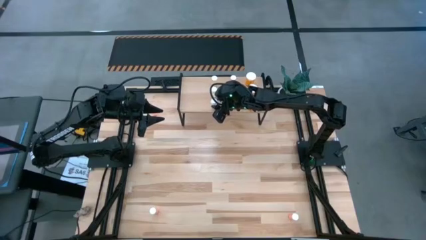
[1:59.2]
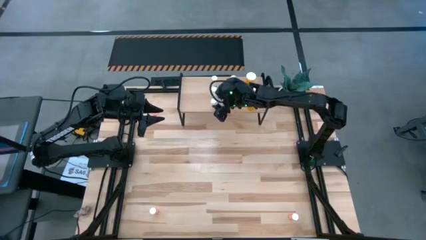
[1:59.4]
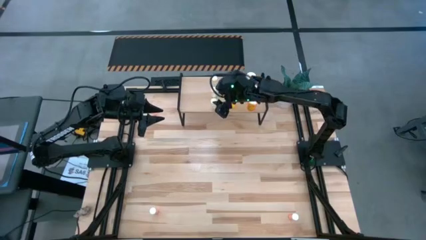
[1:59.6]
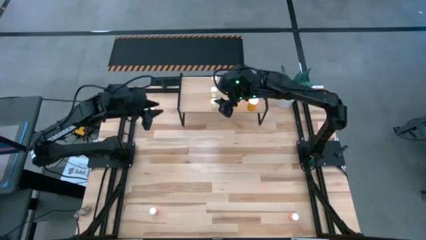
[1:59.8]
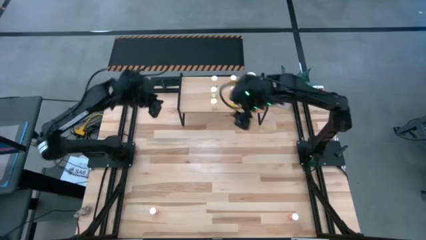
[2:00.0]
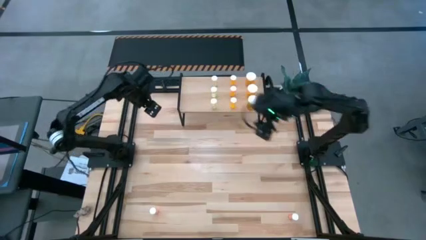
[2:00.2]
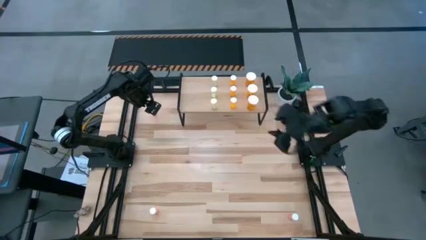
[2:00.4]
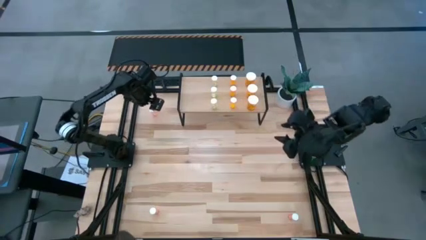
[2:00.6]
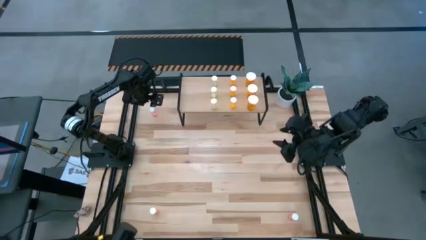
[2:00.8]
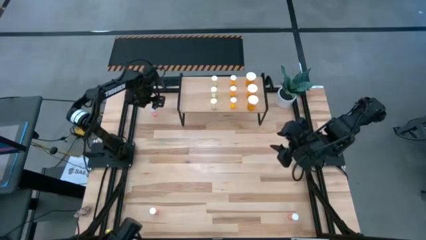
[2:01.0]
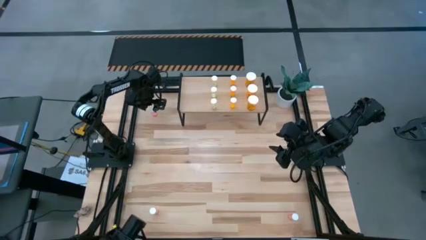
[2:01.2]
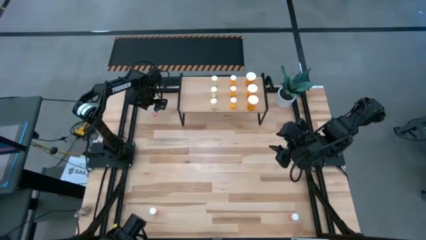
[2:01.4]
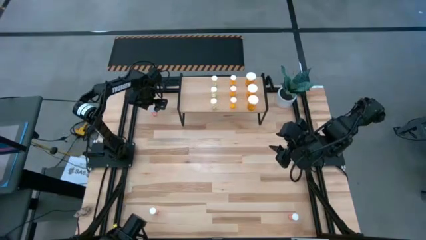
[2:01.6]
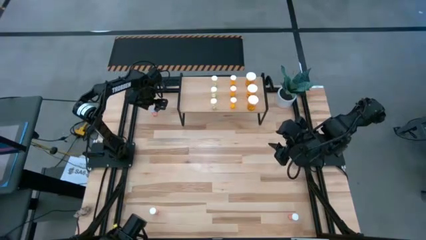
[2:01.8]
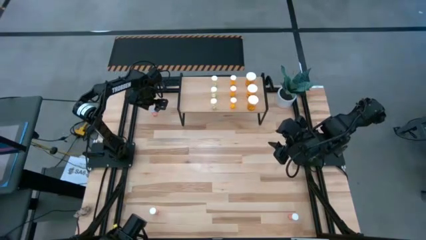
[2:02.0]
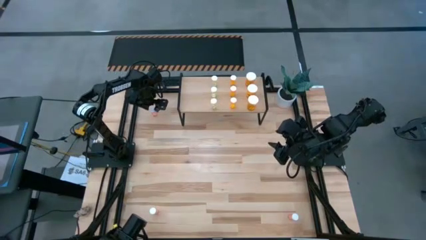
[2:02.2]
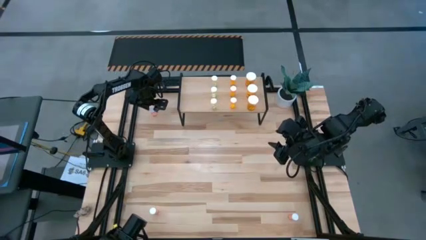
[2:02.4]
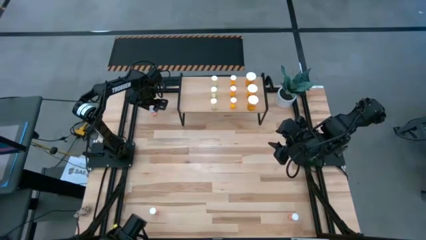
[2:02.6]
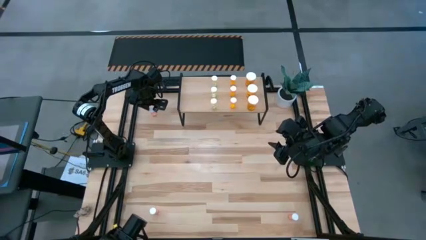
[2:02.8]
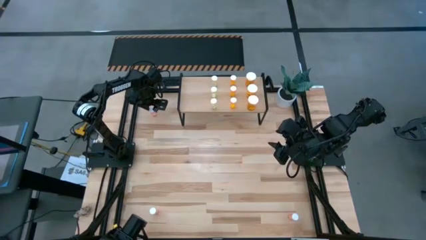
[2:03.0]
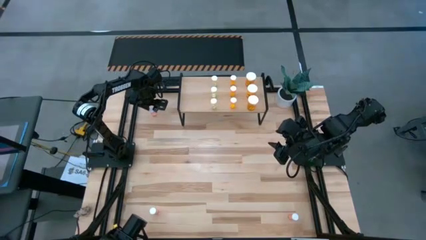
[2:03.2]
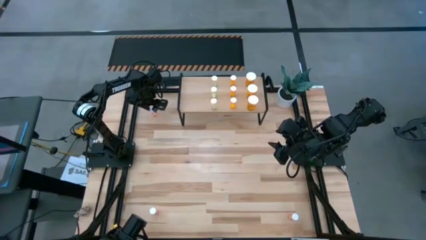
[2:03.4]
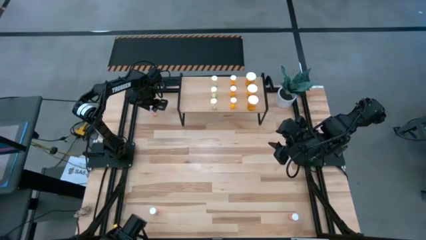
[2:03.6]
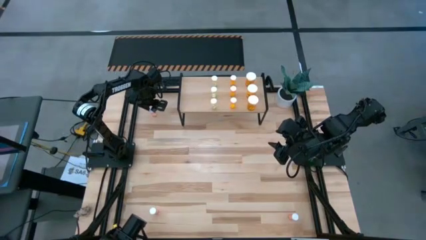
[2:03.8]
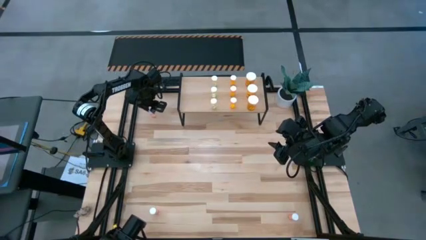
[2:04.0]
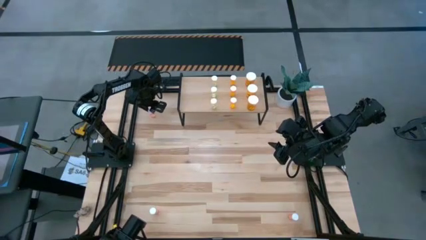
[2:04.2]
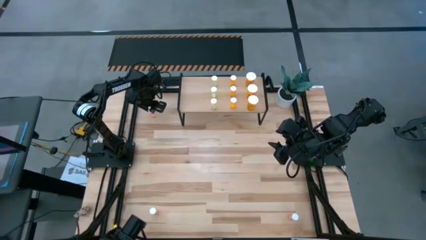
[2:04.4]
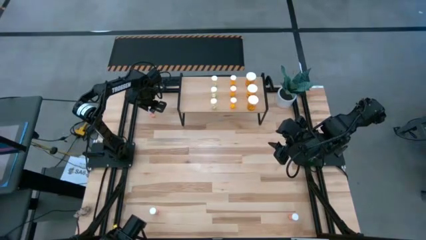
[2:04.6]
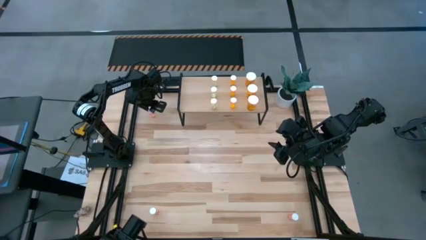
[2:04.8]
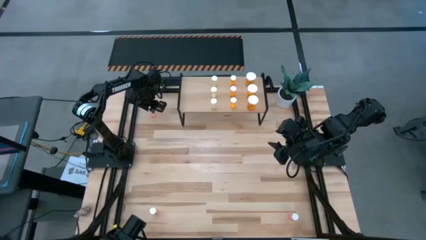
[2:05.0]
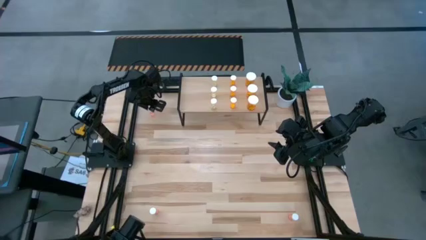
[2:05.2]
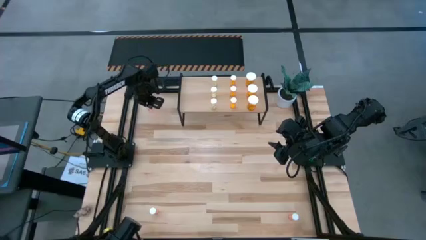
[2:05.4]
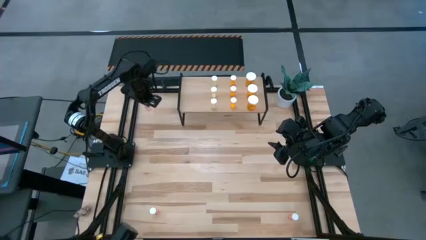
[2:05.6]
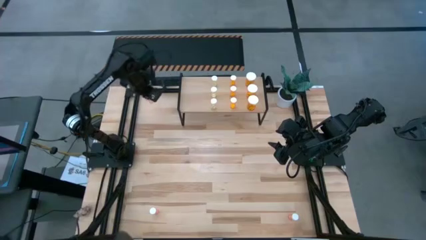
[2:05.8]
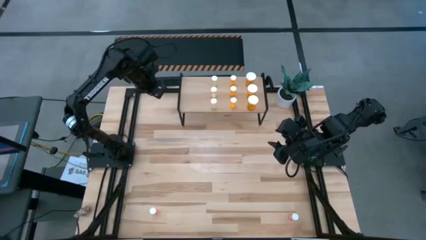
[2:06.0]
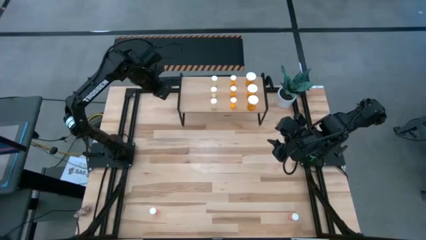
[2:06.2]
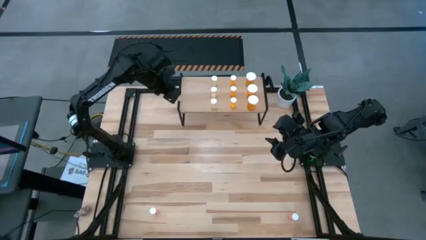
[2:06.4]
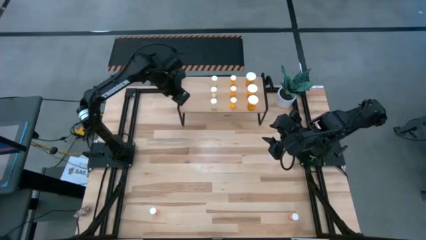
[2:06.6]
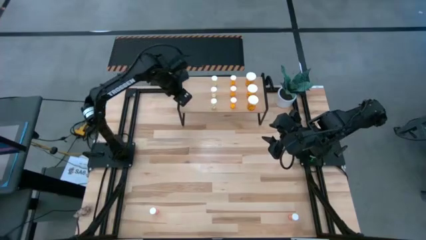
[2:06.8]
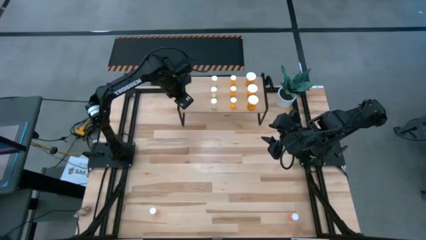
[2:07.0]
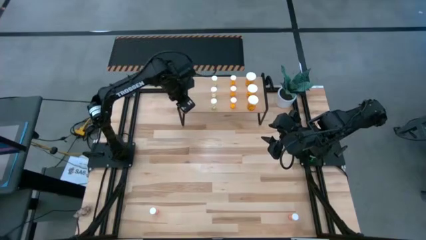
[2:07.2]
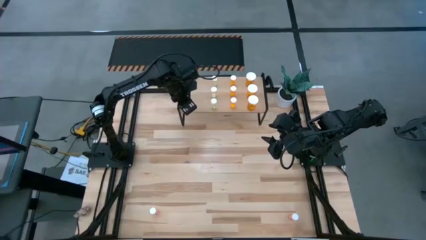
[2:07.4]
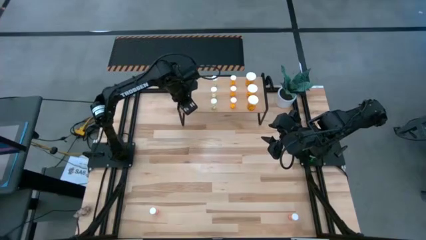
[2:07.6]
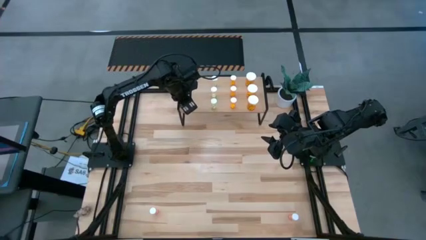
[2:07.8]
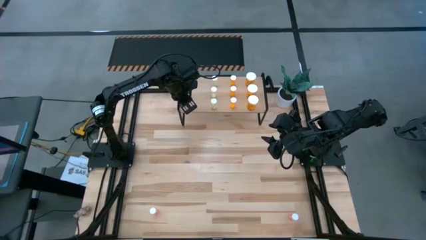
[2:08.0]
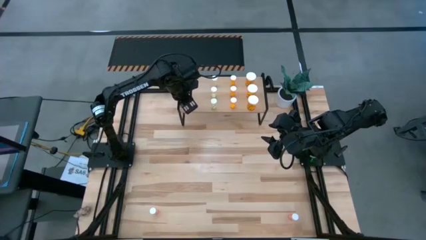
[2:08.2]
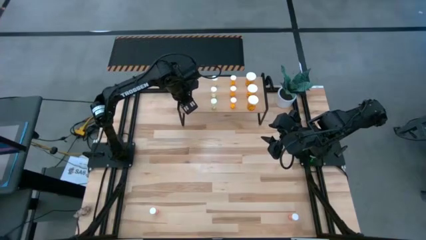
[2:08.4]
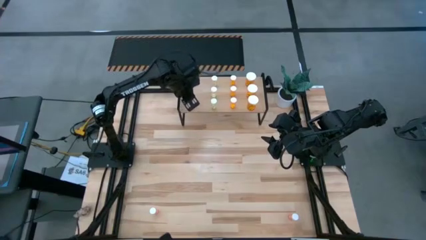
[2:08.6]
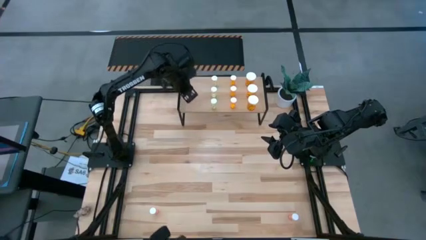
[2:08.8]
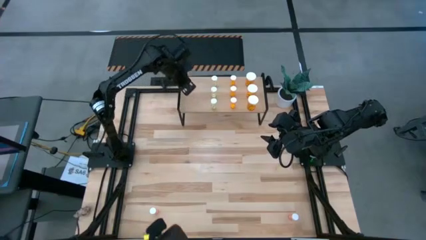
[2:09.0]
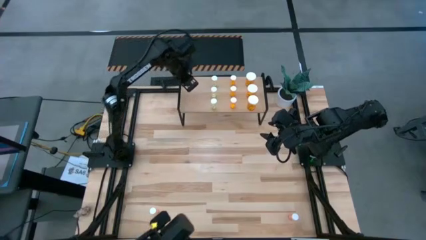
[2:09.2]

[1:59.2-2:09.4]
Task: Pick and place medicine bottles onto shelf by color
Put the top pink pill bottle to the top on the shelf

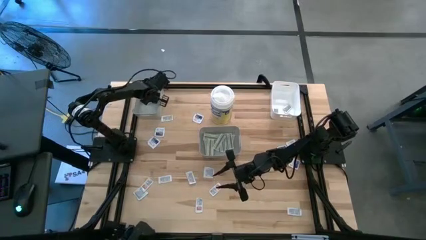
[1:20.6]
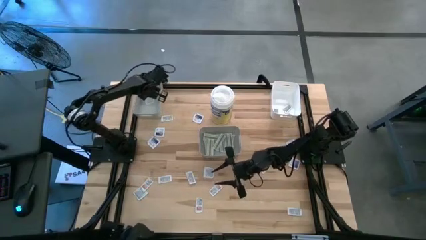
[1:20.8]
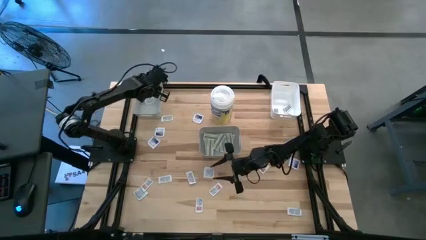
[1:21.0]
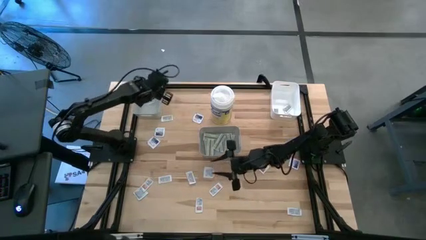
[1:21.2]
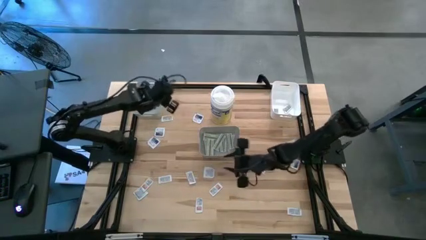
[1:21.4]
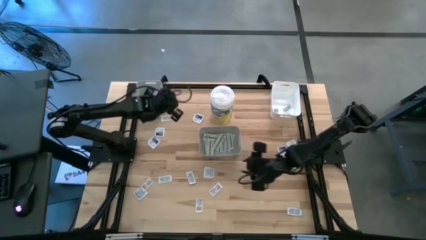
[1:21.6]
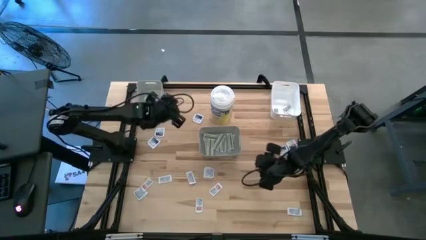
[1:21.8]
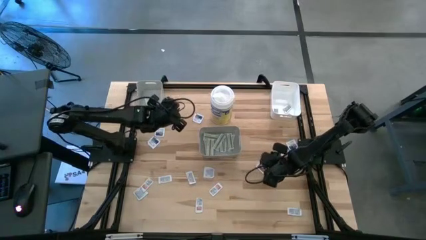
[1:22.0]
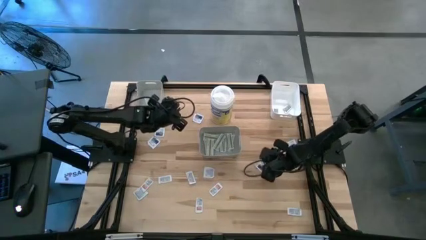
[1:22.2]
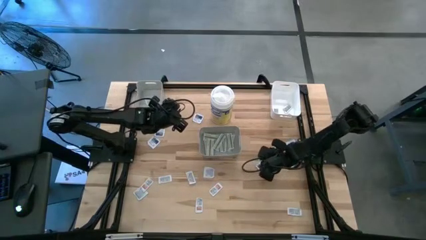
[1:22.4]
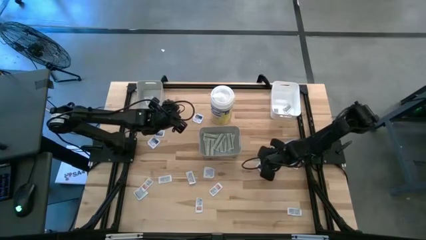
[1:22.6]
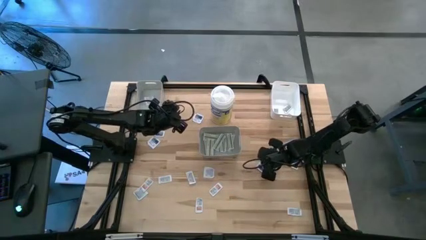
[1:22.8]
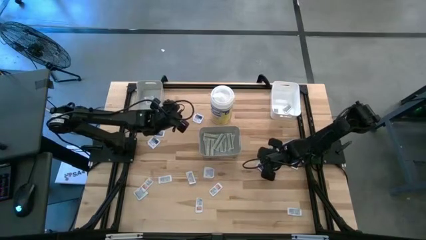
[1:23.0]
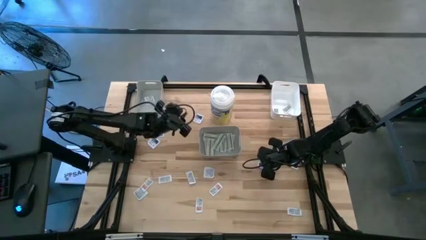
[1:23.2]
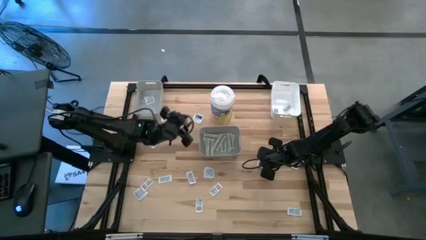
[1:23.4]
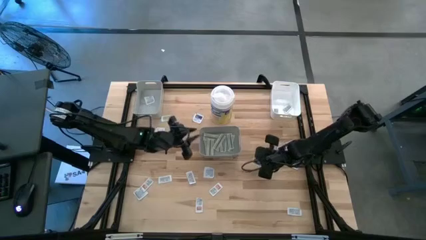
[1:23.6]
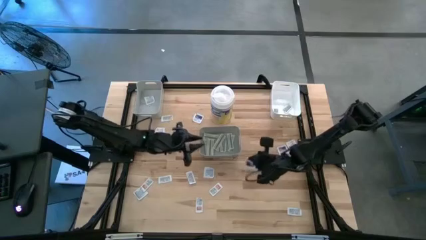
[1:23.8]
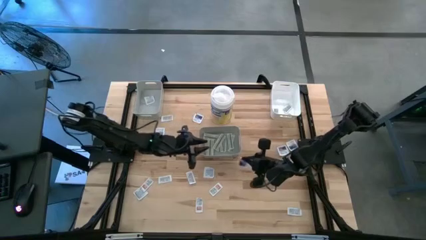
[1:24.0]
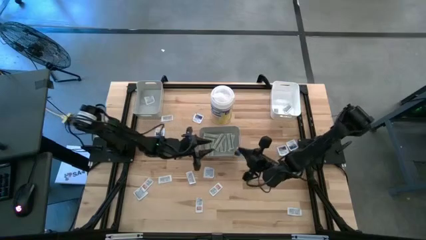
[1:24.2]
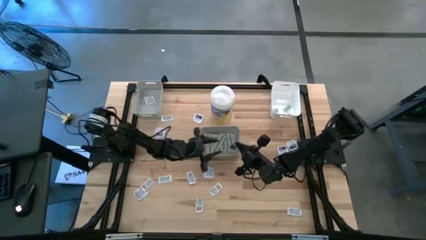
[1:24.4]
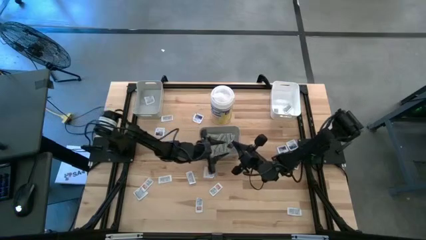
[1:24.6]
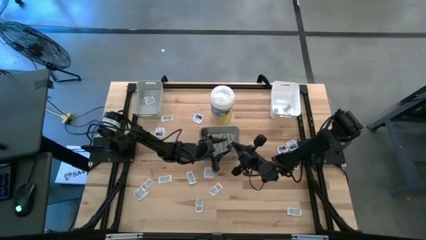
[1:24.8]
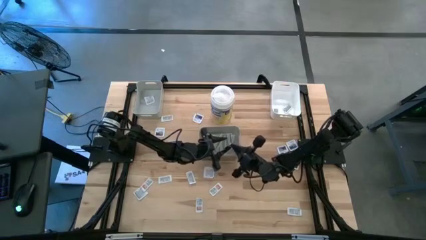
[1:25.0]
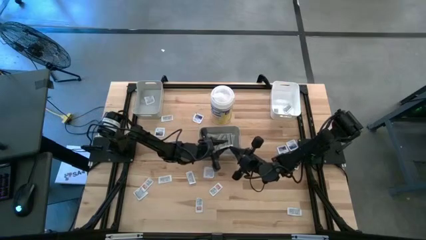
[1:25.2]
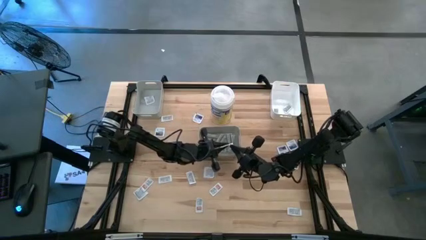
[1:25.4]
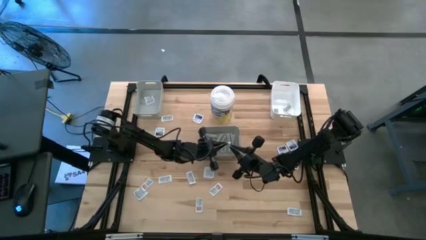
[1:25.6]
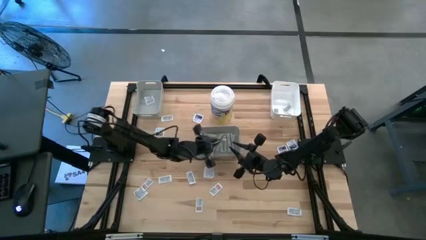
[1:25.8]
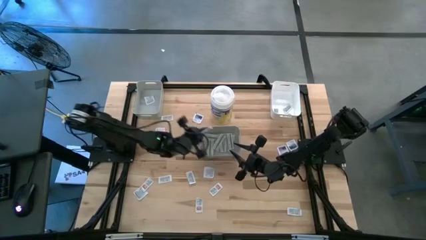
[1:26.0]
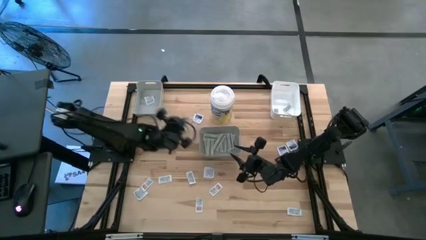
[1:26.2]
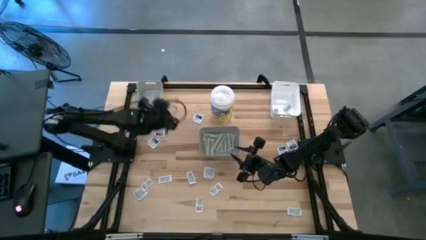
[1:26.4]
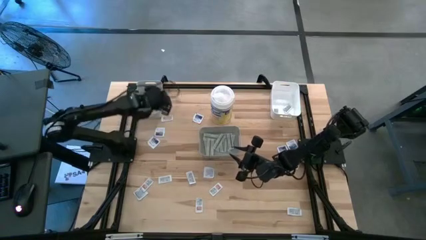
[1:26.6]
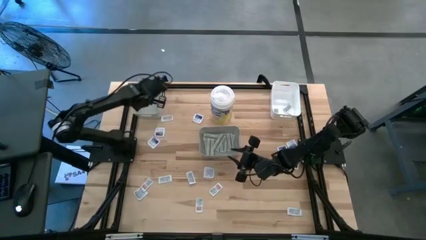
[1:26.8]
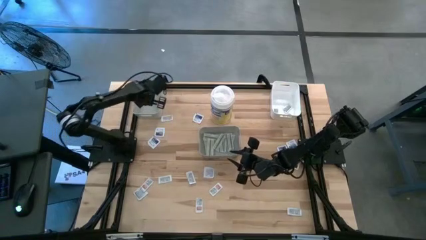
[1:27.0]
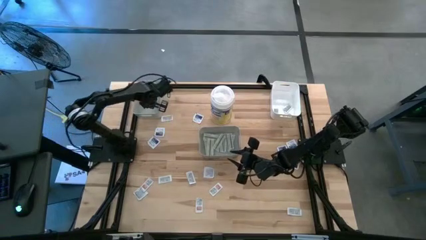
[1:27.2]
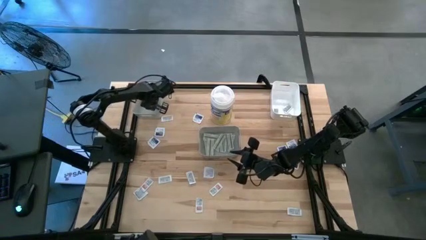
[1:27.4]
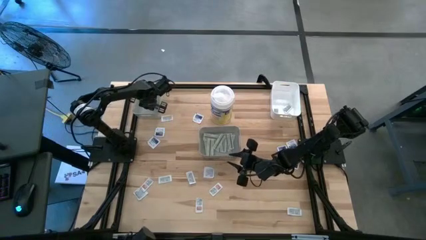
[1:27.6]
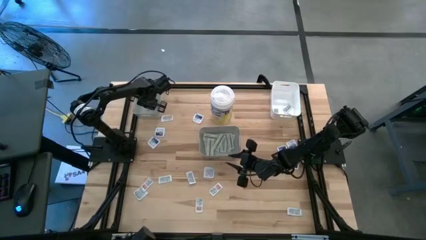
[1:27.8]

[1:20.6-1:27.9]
Task: Pick & Place First Aid Supplies
Put the alcohol pad into the top gray bin
